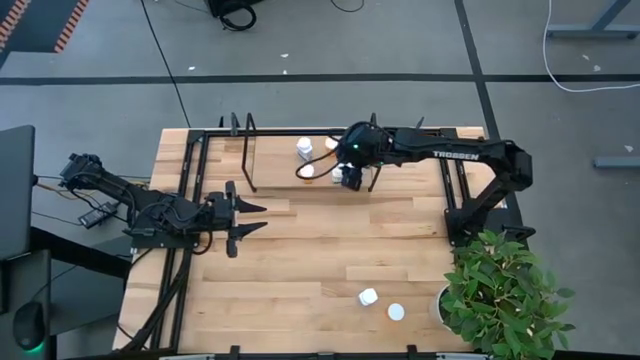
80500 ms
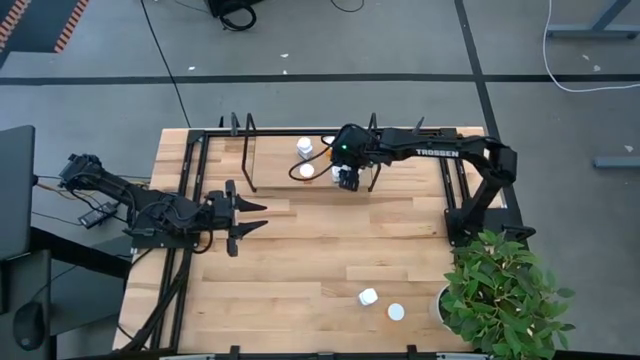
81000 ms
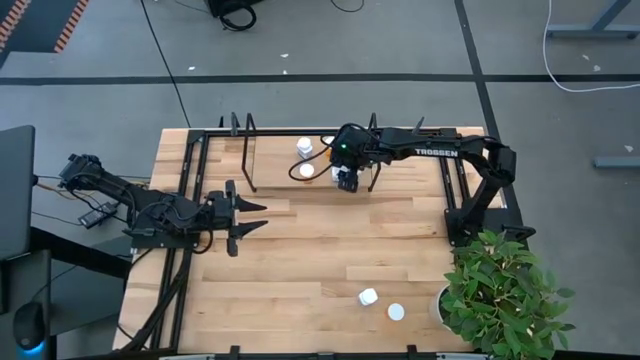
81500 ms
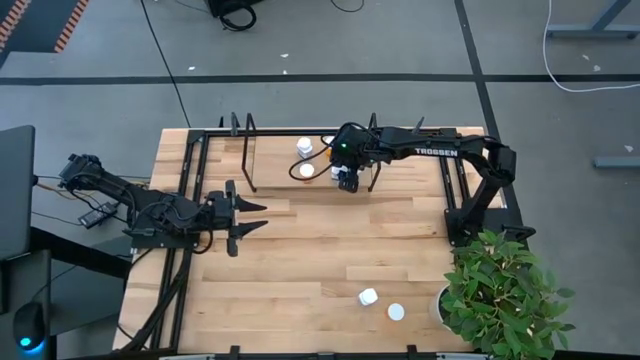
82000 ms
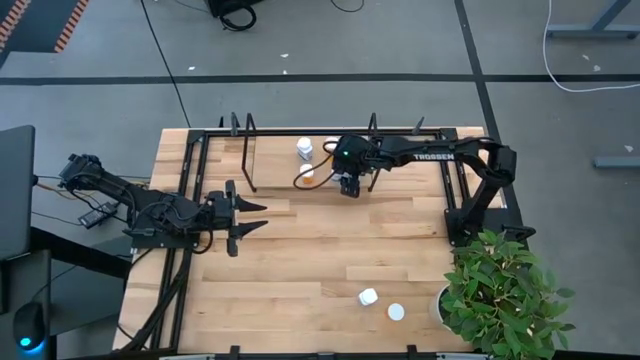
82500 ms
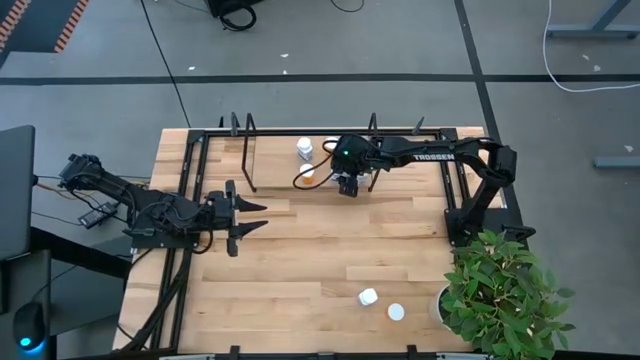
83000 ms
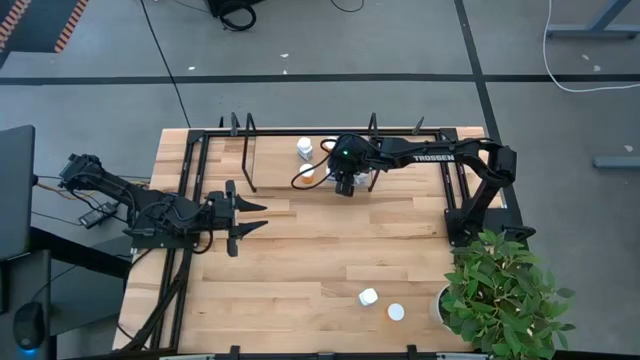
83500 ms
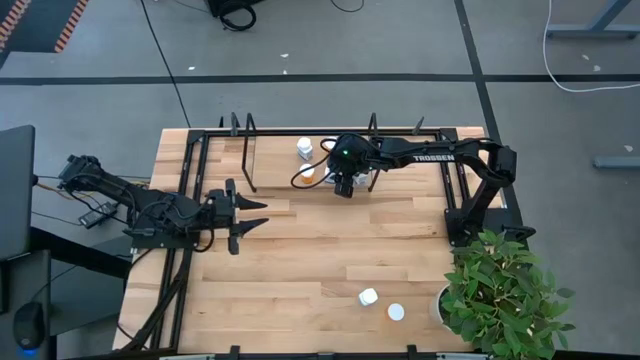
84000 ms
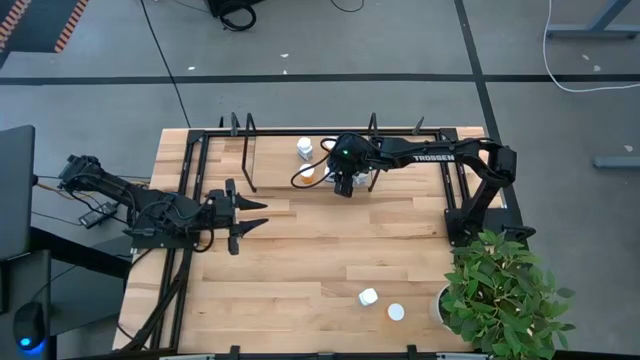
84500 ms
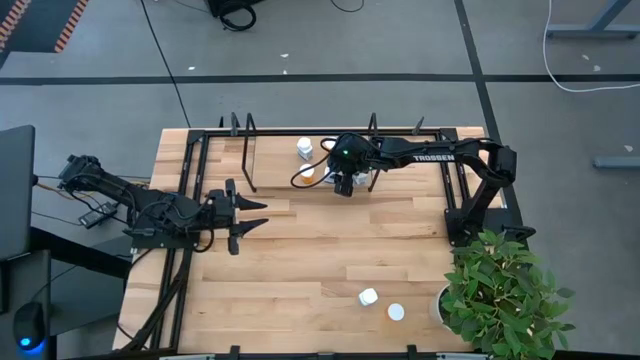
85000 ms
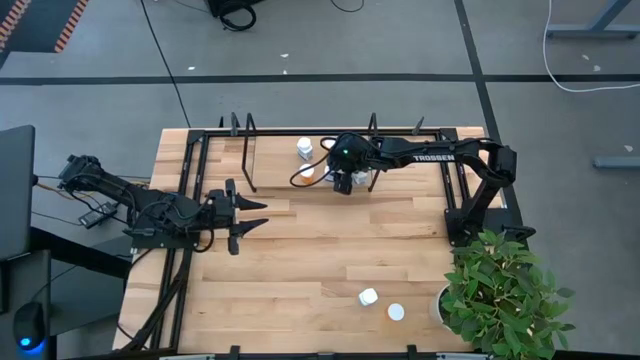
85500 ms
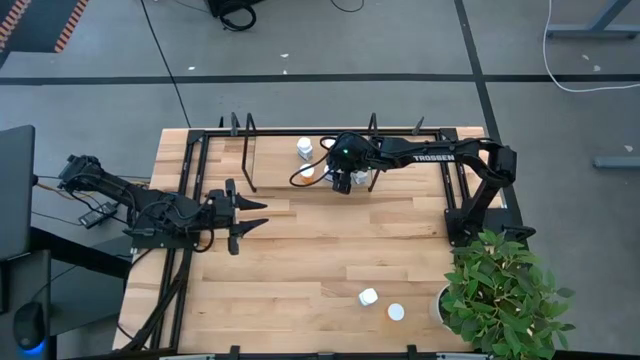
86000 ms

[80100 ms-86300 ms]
Task: Pick and place medicine bottles onto shelf by color
Adjust the white pill bottle on the shelf

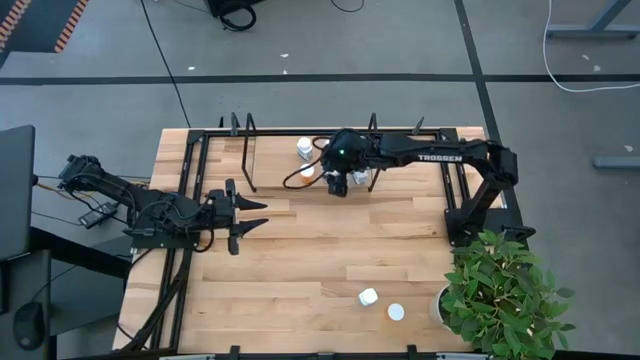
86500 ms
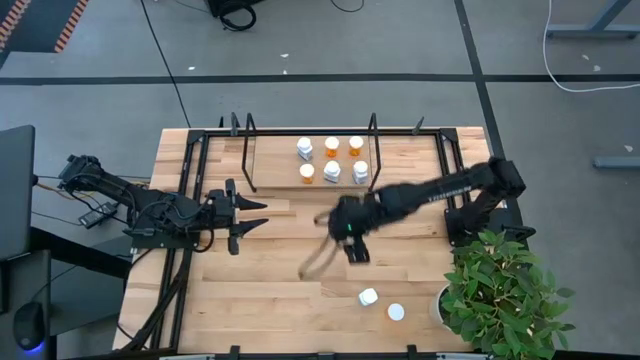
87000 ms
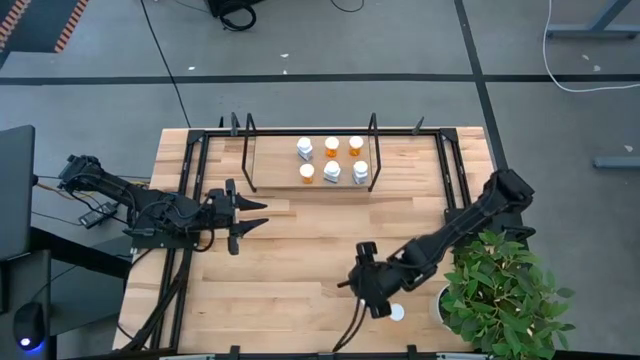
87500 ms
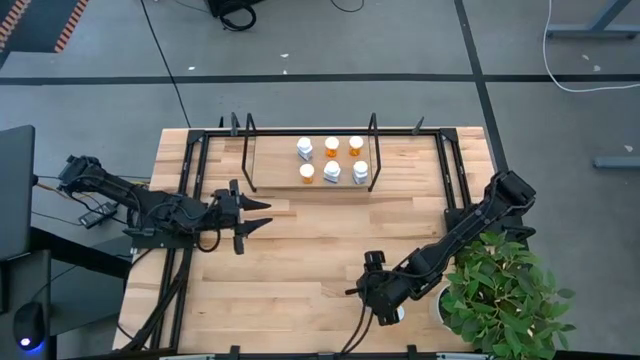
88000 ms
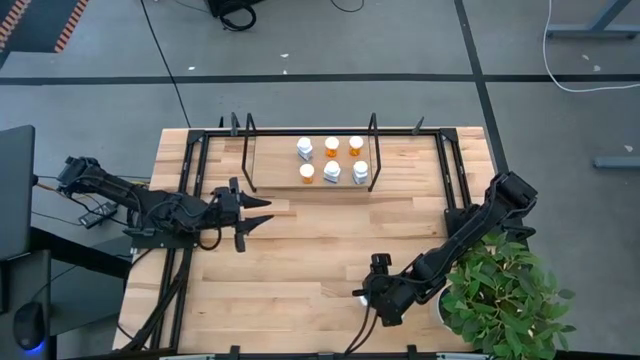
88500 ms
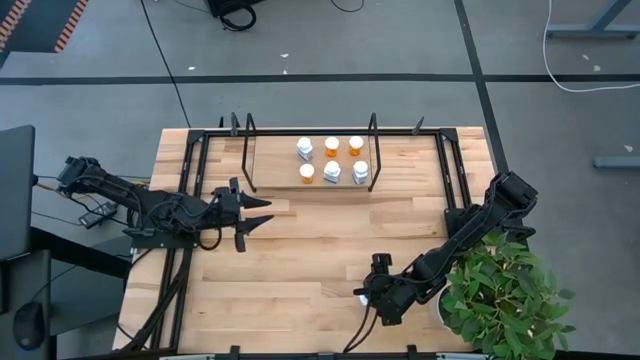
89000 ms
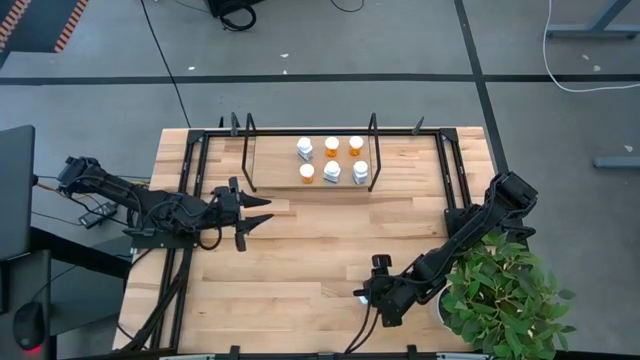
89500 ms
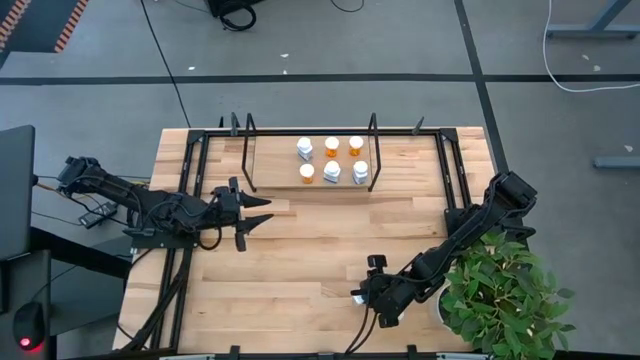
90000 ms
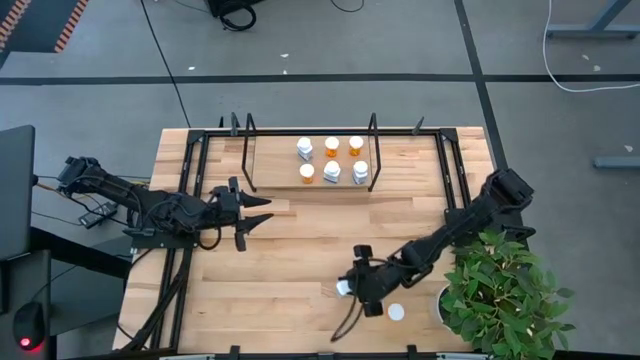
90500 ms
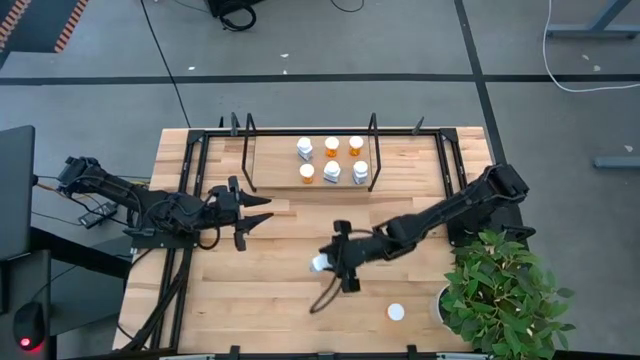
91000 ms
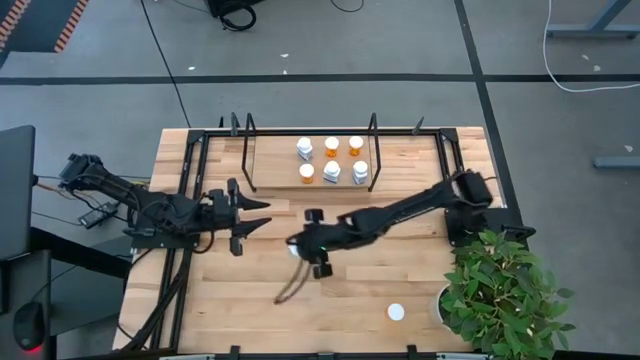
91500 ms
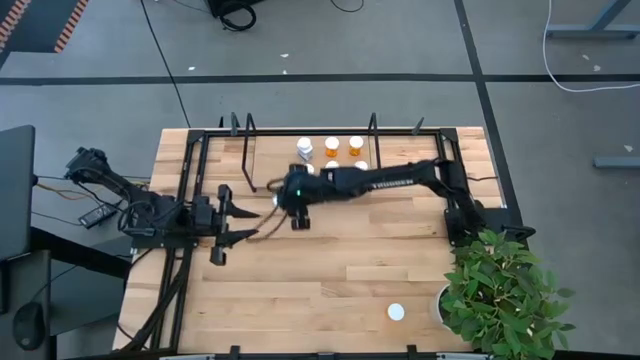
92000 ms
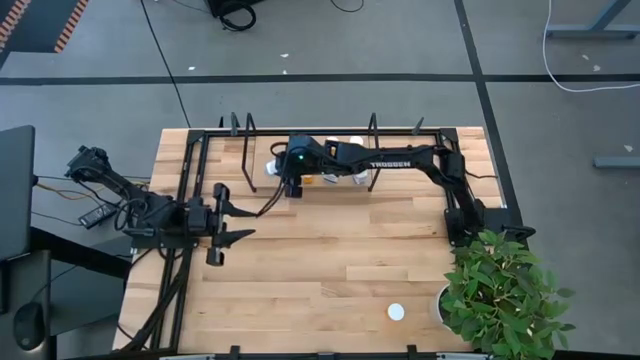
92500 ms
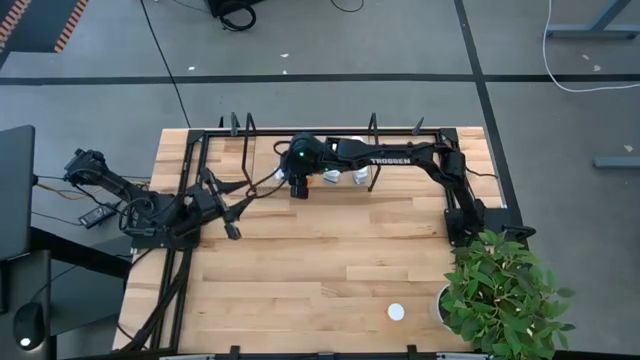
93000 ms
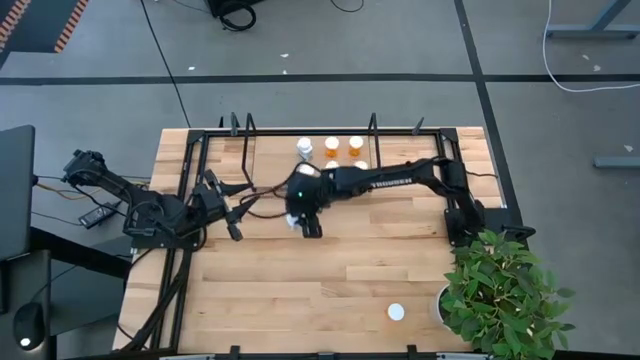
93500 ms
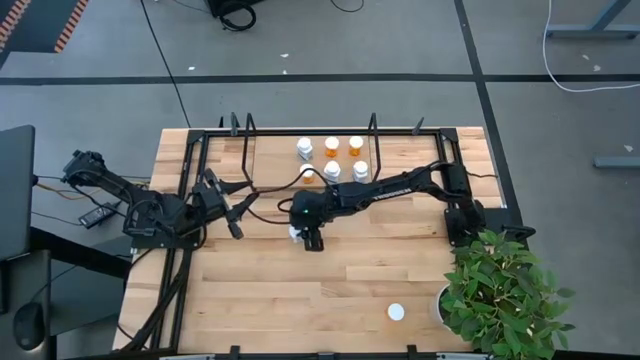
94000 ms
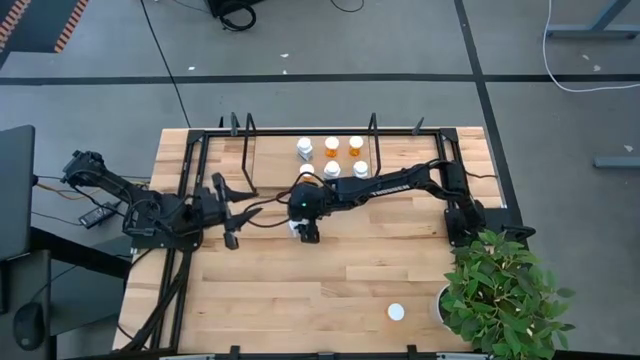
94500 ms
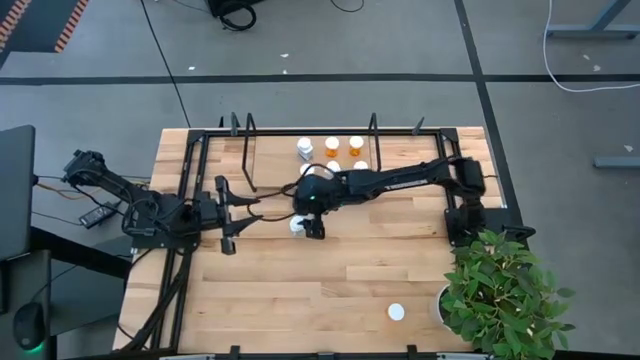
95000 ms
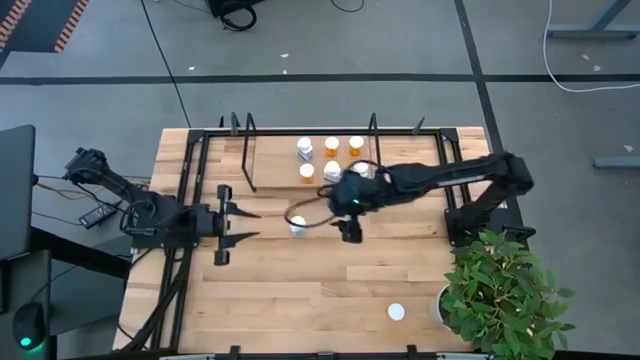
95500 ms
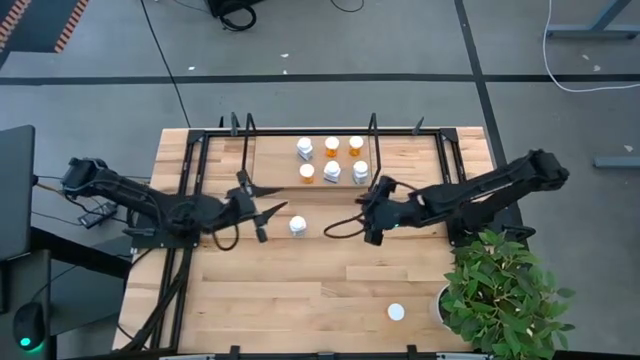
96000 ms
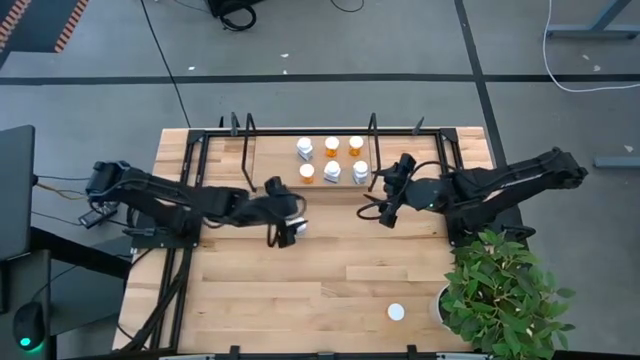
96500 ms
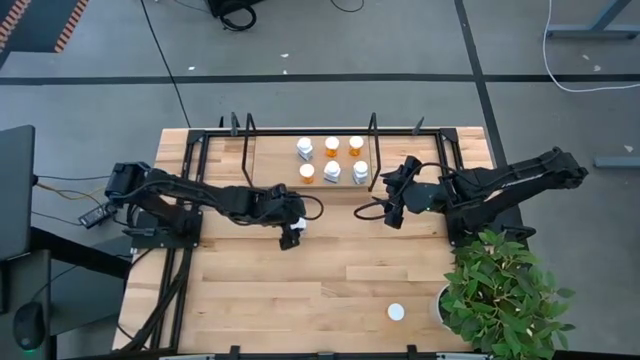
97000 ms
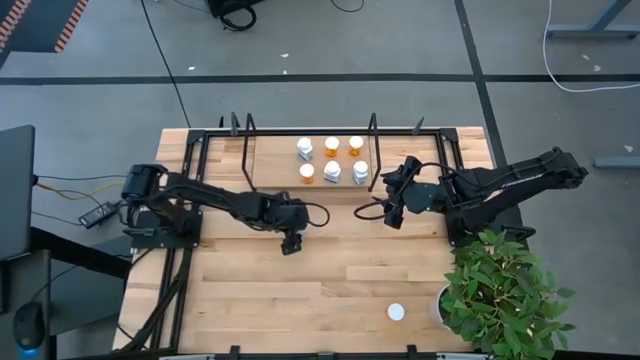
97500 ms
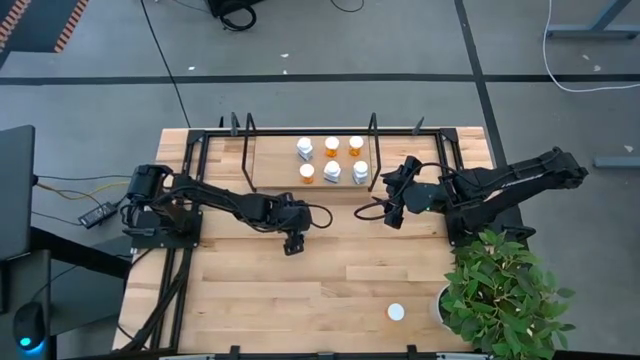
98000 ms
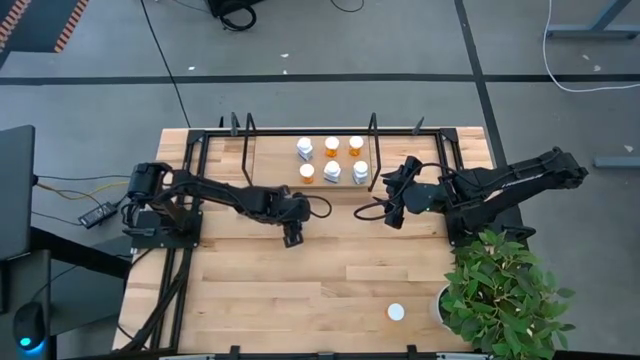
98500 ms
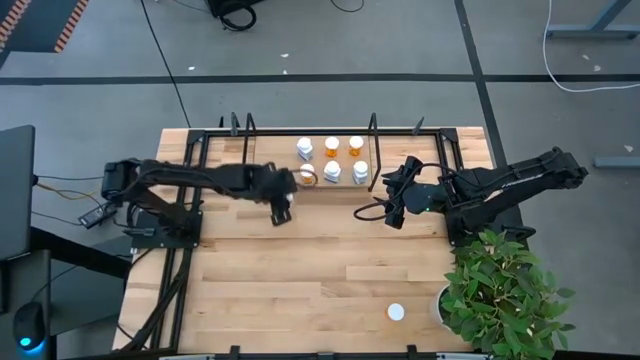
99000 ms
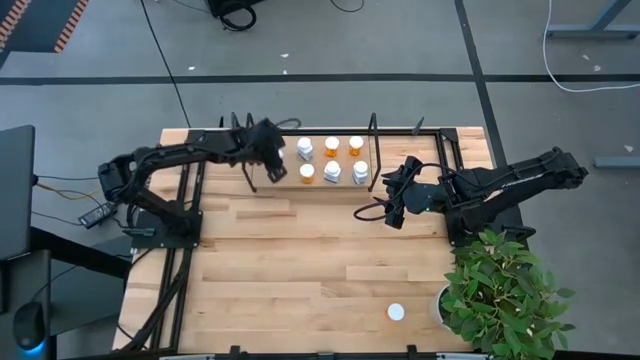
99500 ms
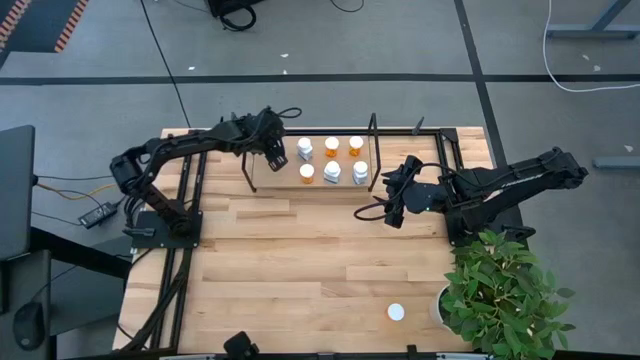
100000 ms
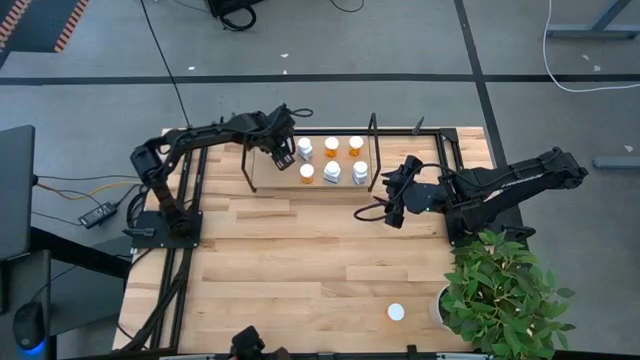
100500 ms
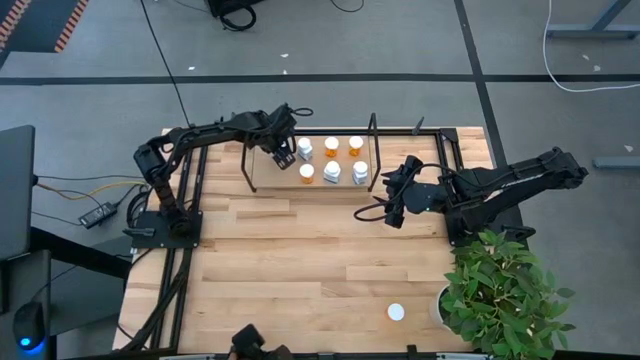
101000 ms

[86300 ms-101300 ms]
Put the white pill bottle on the shelf
